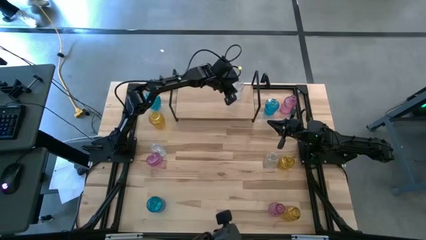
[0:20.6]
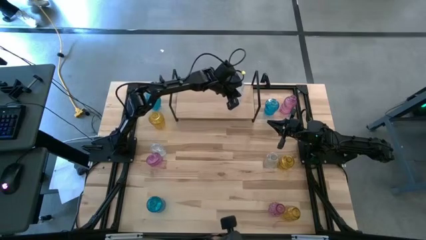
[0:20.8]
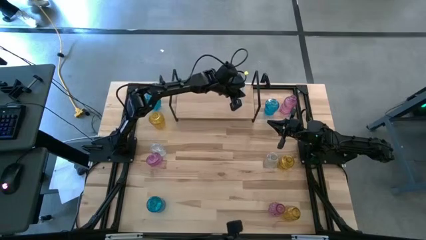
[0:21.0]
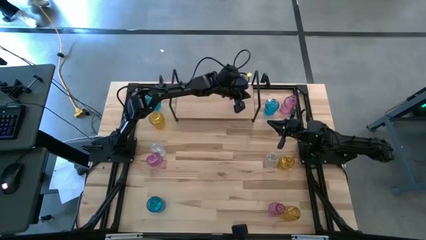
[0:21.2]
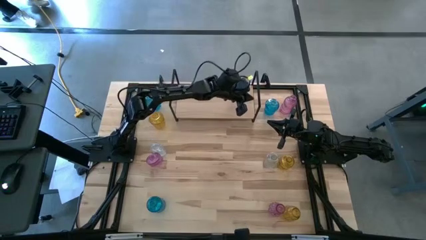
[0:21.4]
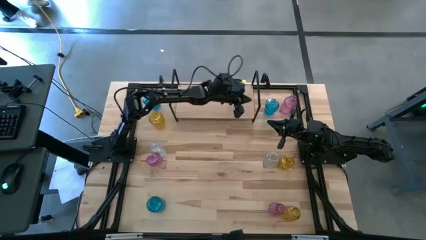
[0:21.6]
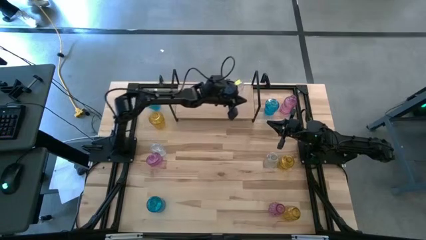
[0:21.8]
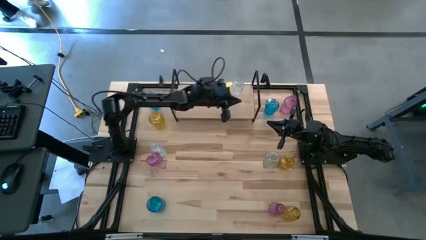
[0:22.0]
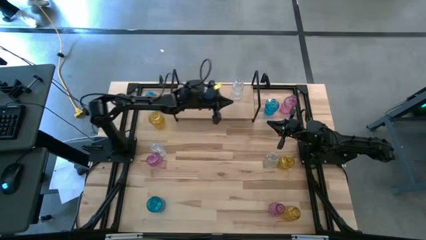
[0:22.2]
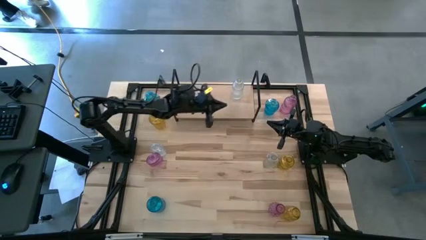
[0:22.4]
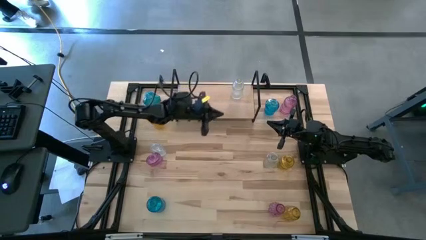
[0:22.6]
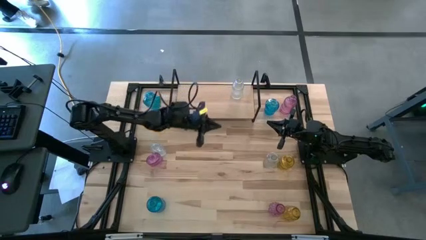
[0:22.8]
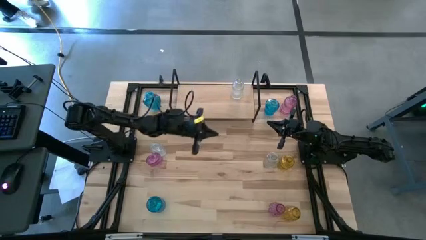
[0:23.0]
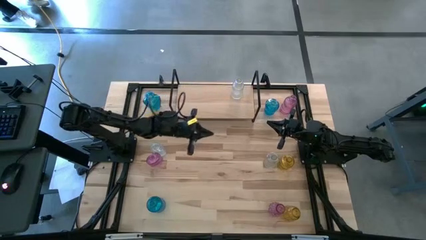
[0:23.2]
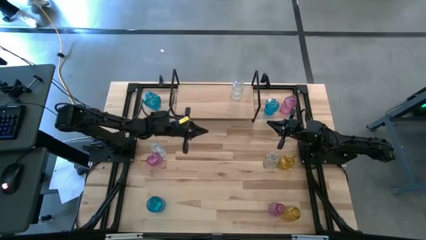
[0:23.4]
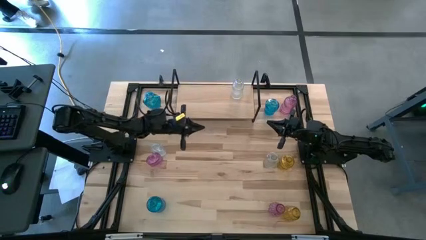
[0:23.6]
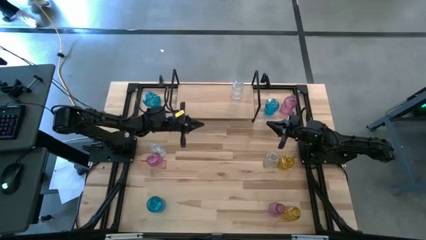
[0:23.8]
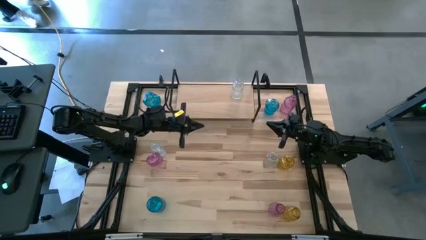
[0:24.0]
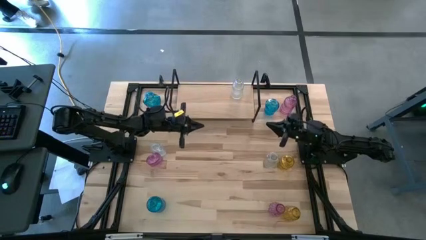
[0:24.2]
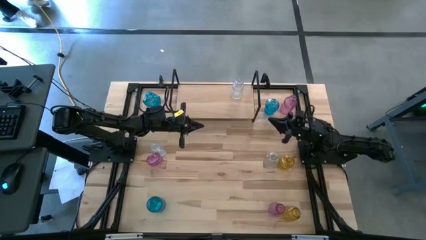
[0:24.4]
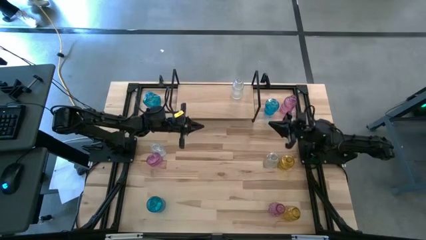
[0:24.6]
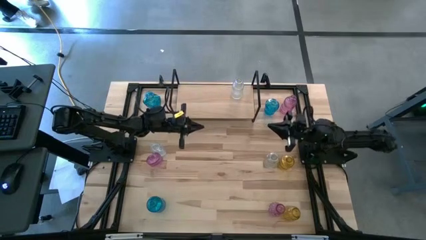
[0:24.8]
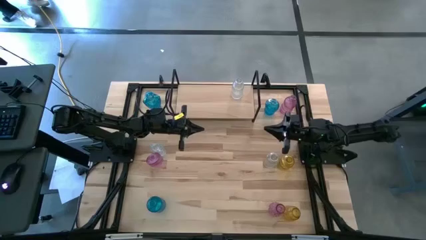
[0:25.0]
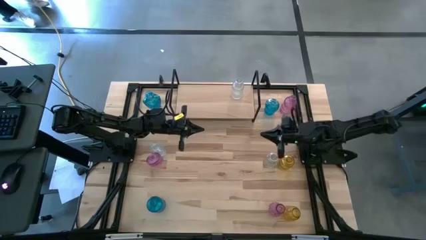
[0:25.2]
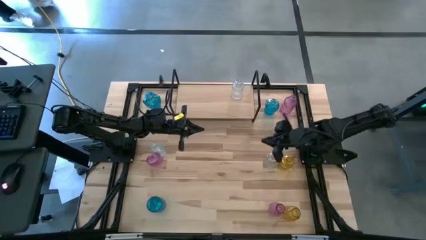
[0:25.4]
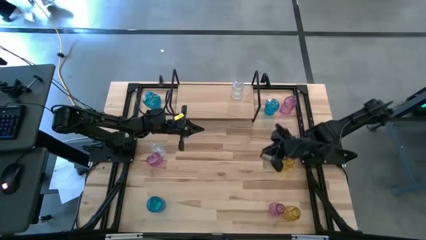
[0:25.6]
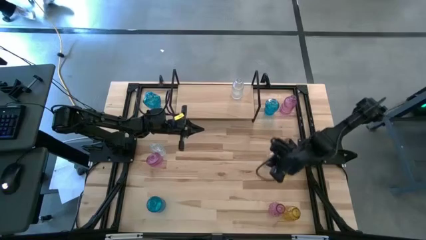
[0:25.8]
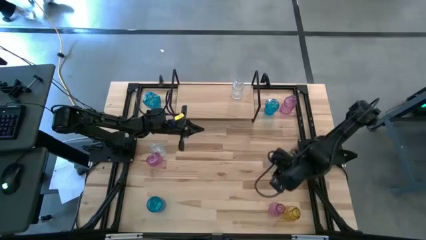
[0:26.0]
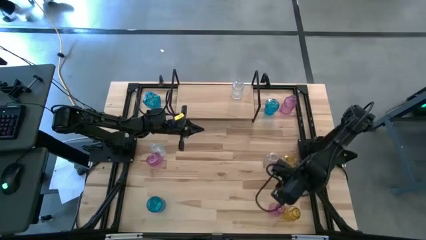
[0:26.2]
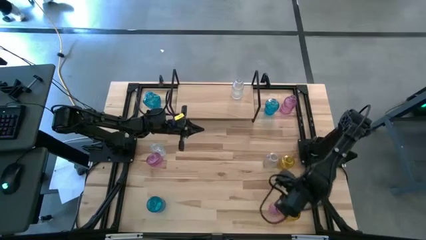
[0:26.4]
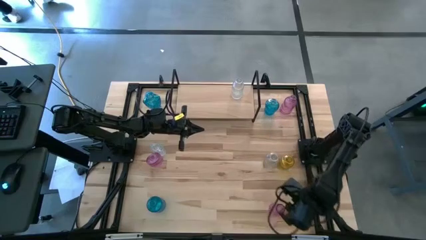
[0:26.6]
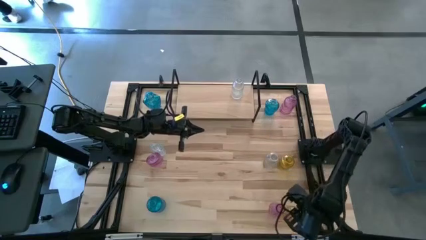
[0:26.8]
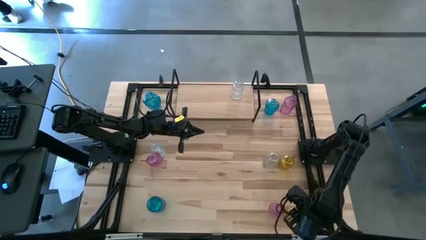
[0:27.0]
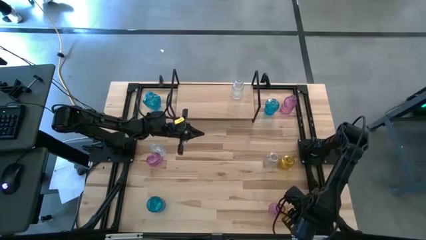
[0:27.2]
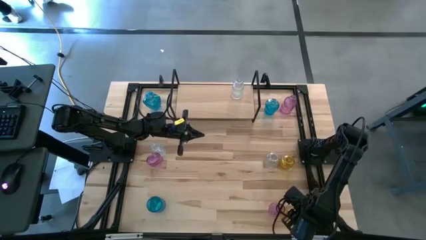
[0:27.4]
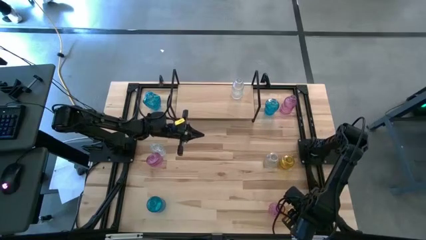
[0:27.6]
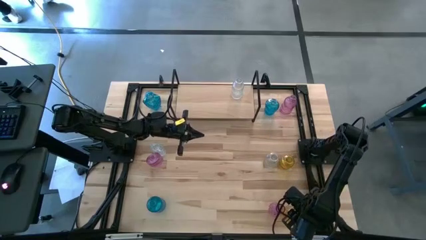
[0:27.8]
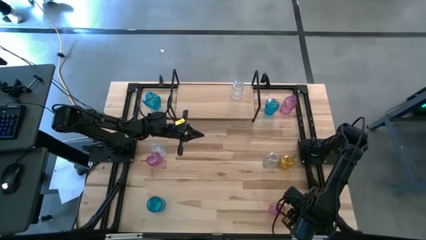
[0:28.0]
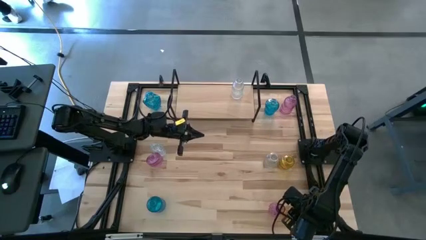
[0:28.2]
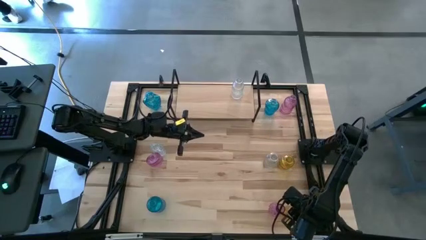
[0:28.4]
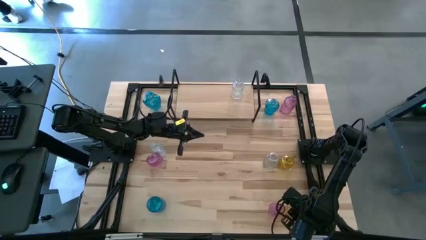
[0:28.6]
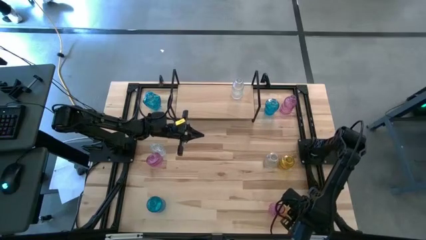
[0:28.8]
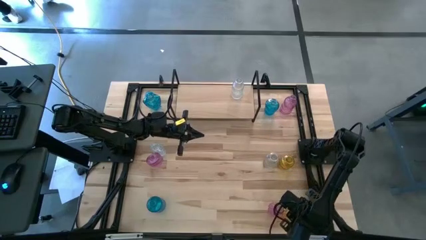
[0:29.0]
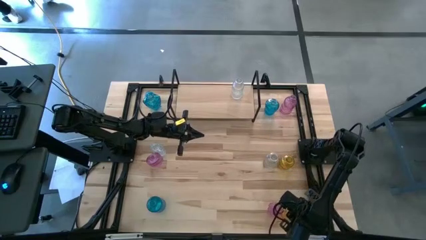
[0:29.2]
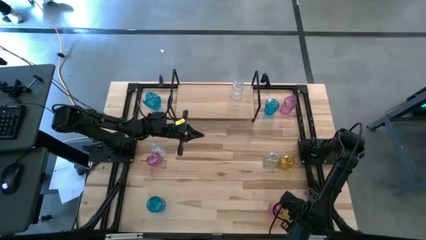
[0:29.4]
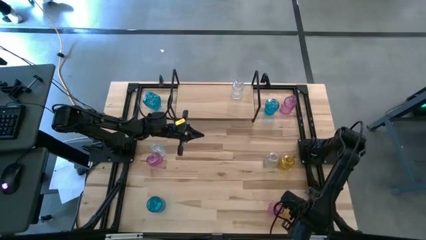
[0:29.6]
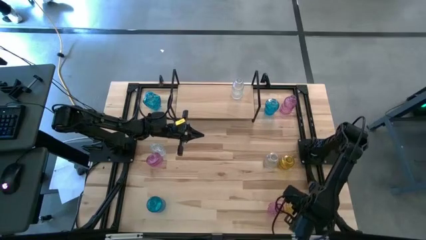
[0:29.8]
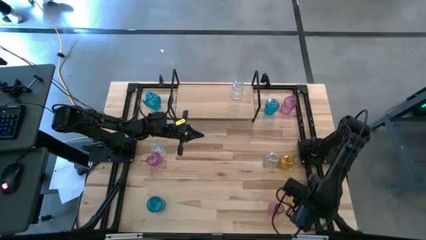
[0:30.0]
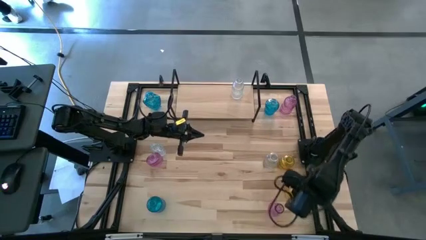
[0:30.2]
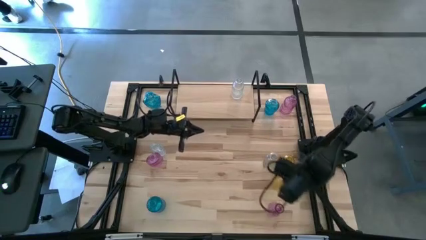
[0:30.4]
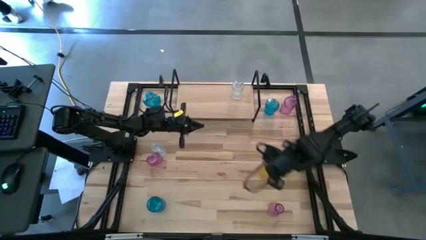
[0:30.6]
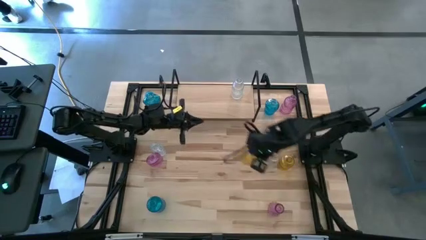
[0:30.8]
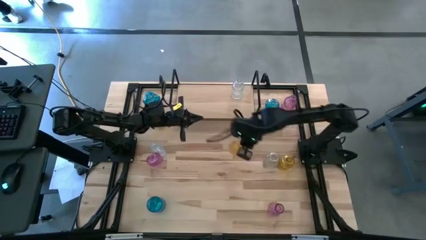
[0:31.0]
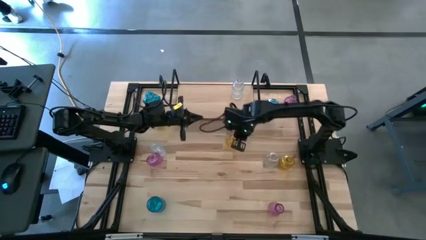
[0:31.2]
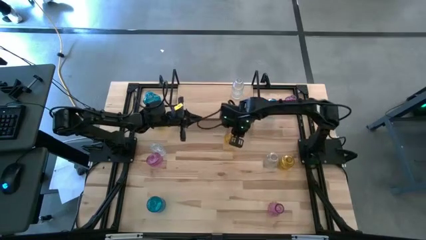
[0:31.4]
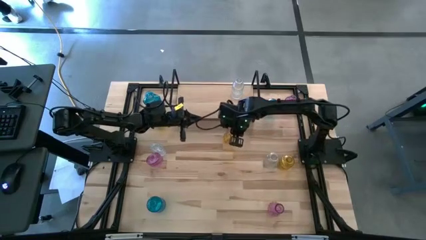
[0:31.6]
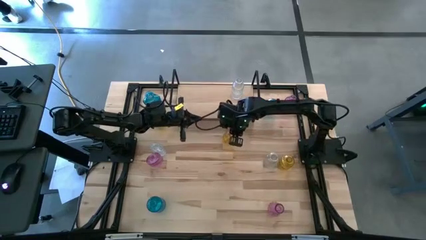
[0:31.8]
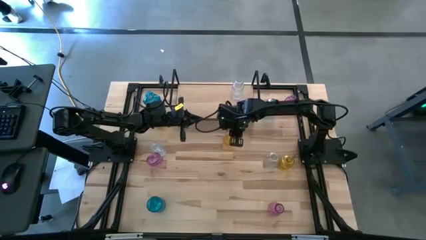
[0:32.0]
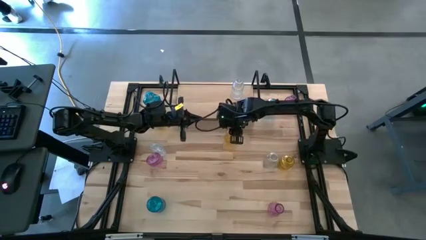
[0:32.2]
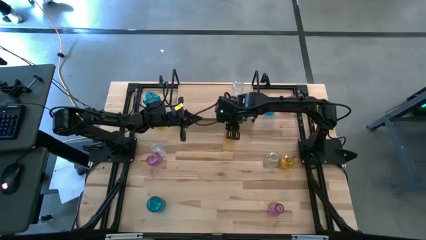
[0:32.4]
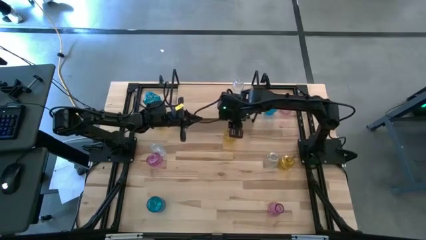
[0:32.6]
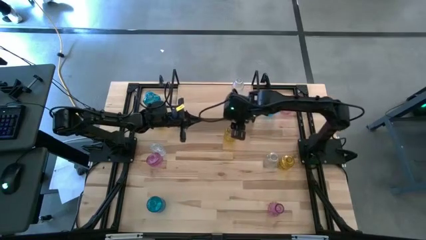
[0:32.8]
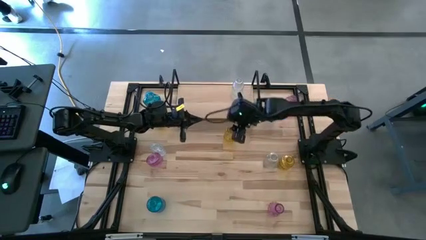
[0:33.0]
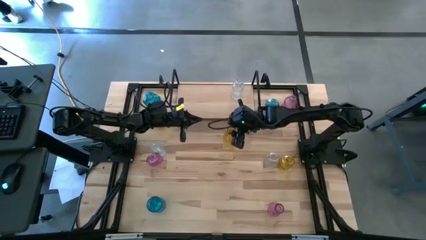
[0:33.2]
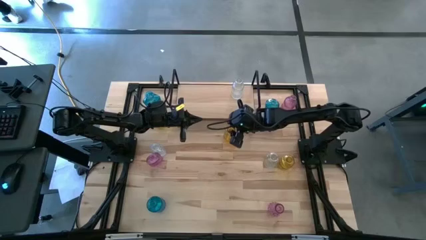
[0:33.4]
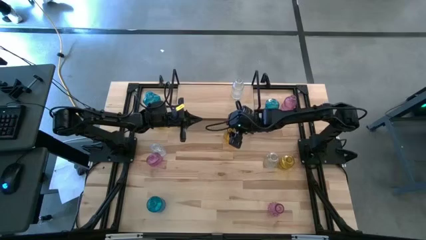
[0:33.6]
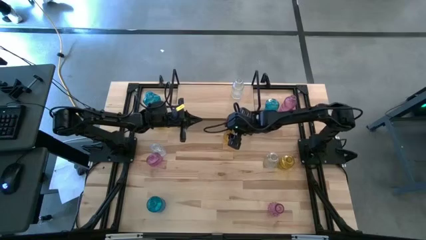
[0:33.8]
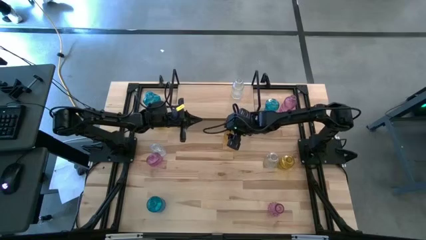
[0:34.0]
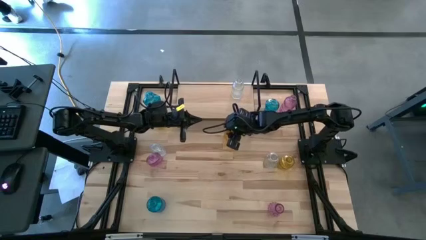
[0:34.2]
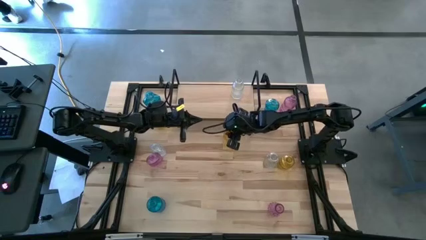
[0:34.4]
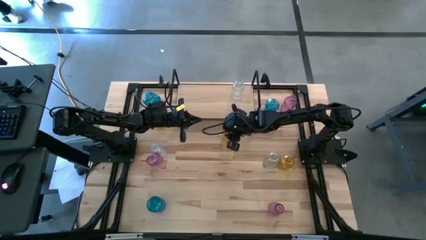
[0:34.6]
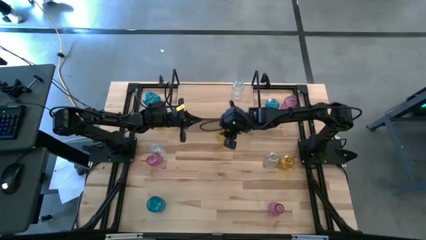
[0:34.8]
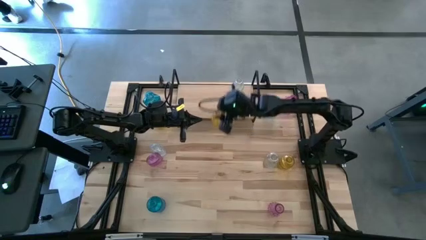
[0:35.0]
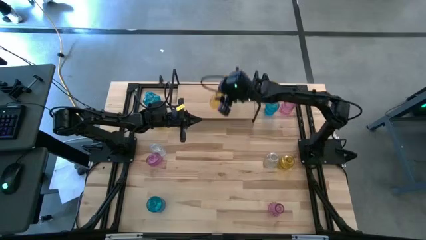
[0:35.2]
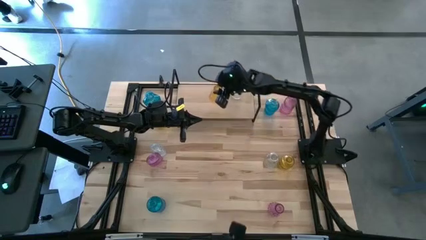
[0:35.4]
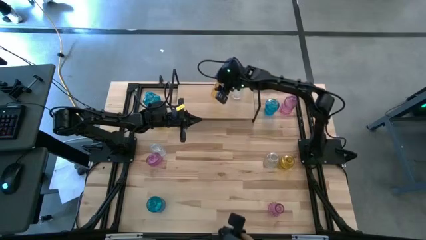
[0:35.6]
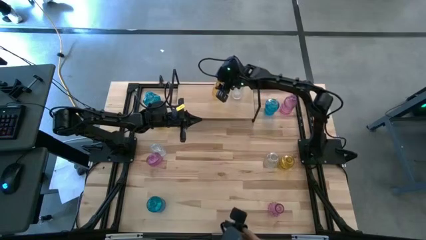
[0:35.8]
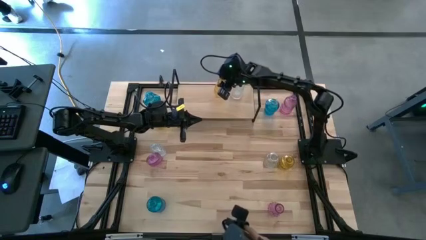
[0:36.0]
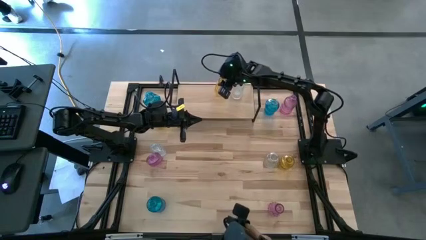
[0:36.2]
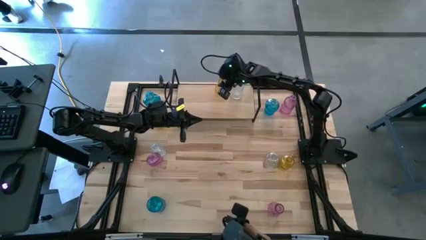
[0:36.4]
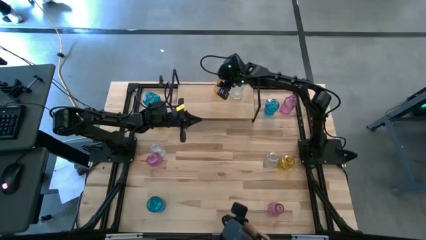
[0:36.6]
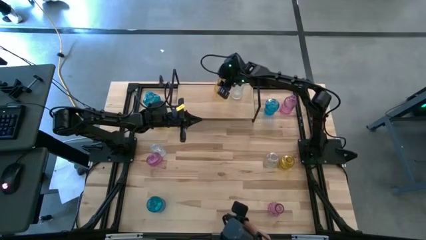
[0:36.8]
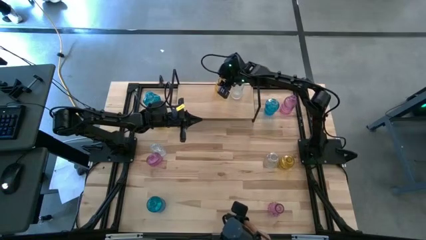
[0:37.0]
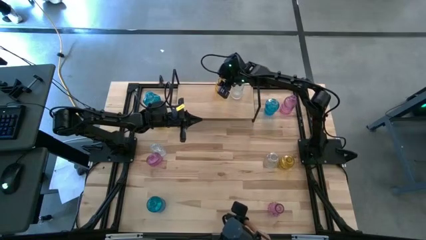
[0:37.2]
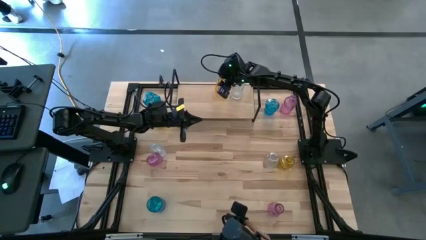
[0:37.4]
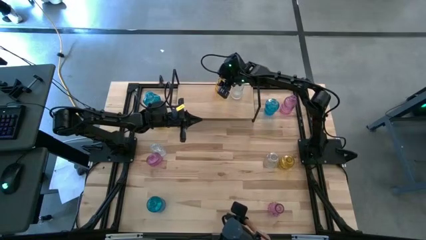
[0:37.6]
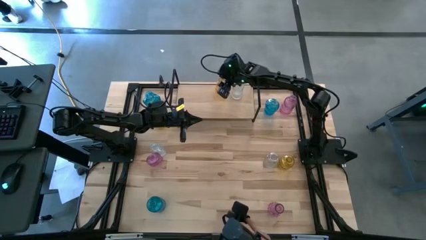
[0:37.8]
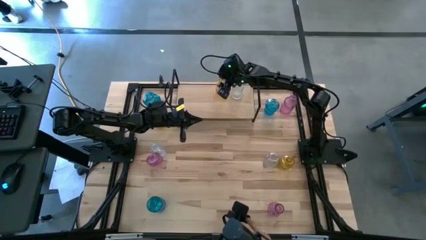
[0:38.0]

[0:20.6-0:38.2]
Task: sort vases onto shelf
Put the bottom yellow vase on the shelf
